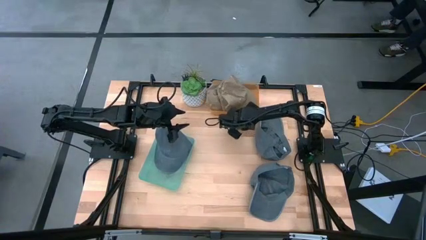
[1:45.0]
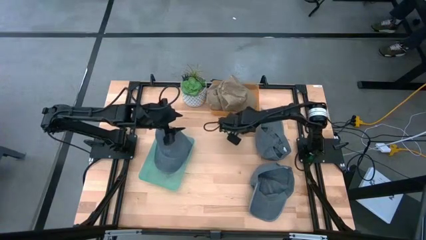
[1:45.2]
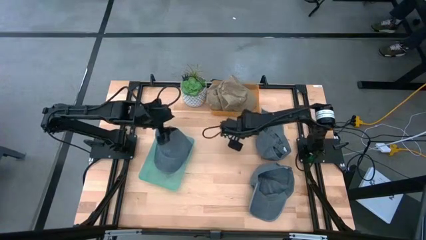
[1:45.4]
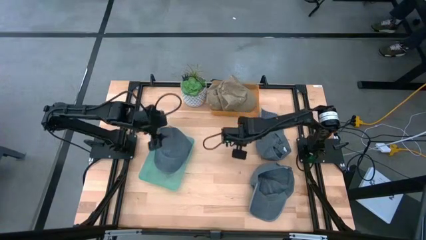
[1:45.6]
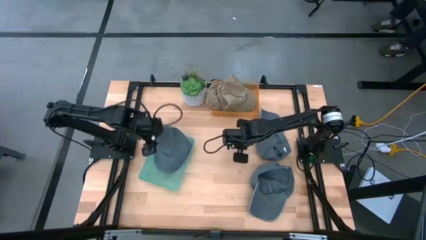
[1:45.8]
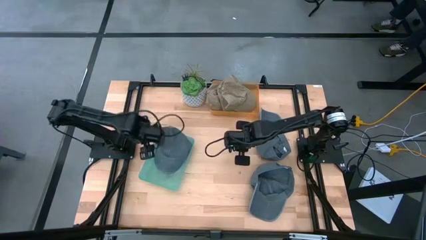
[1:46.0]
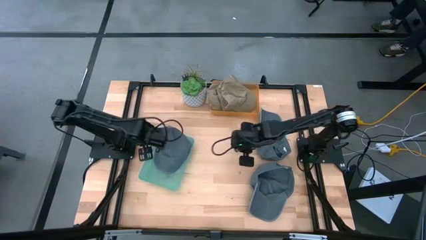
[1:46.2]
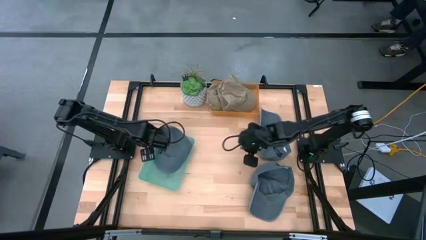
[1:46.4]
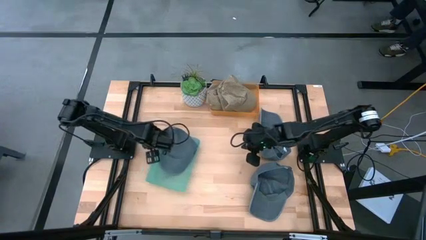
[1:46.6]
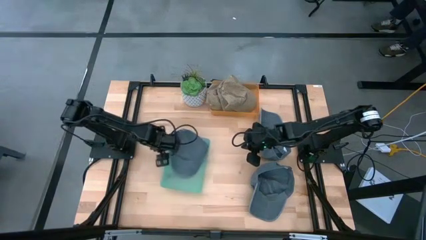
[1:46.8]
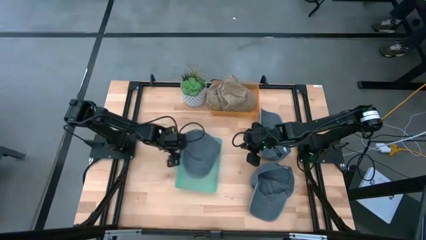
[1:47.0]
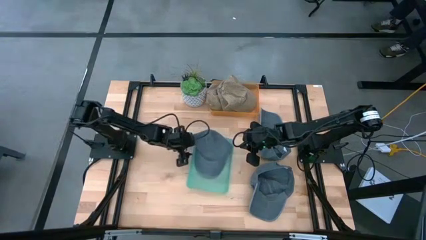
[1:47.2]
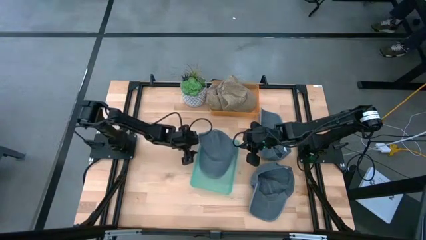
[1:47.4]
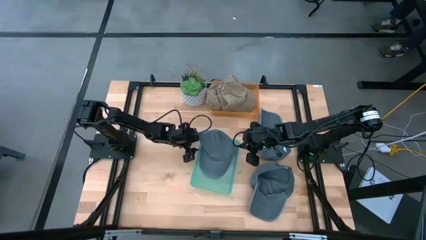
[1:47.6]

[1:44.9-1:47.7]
Task: Pick & Place hat
Adjust the green bin on the middle of the table

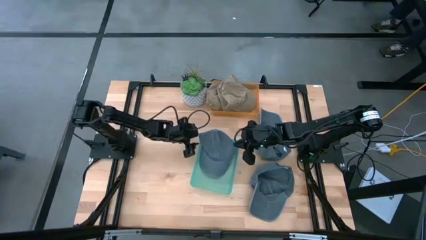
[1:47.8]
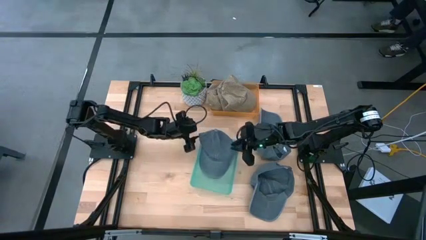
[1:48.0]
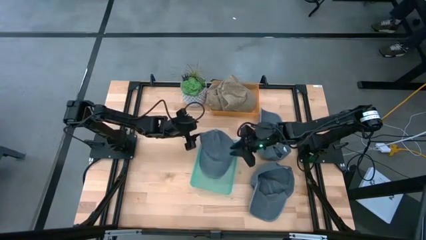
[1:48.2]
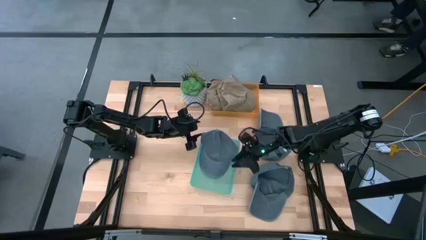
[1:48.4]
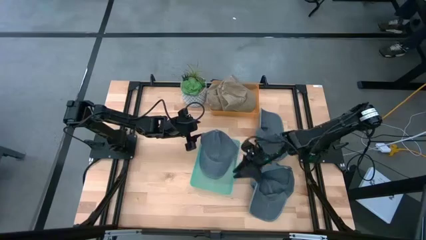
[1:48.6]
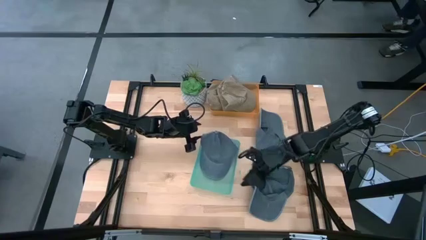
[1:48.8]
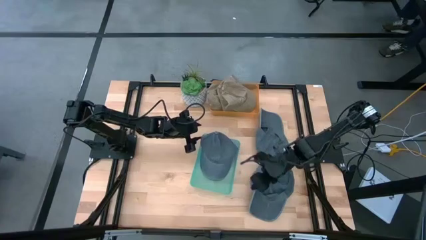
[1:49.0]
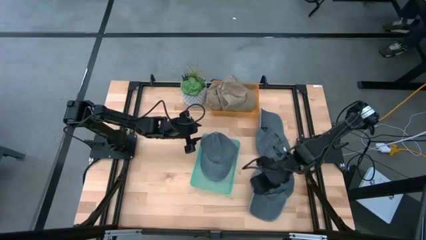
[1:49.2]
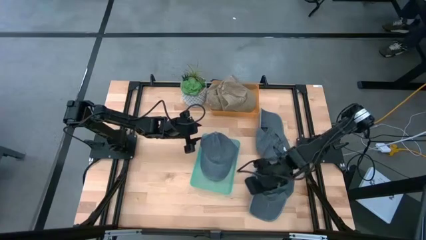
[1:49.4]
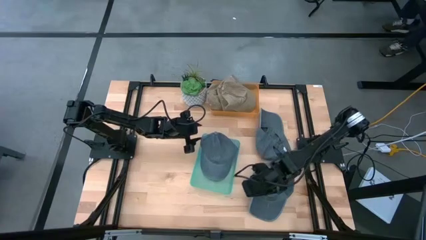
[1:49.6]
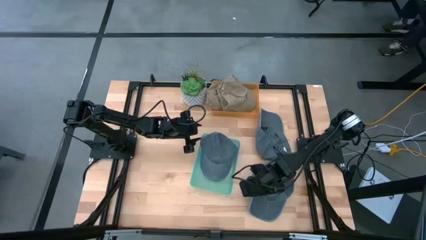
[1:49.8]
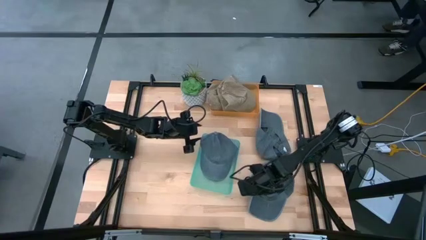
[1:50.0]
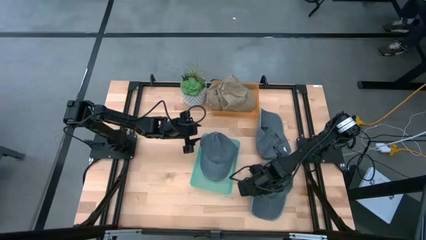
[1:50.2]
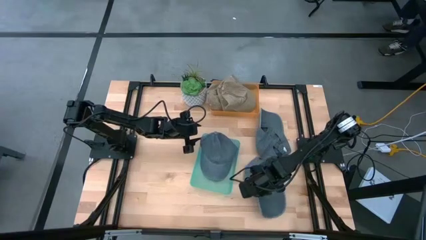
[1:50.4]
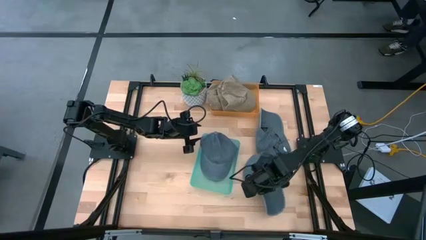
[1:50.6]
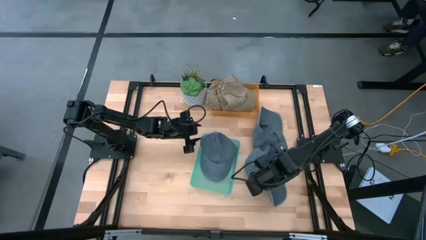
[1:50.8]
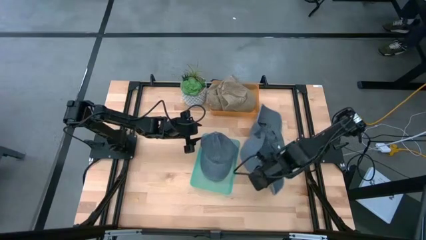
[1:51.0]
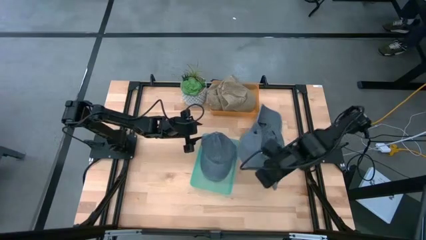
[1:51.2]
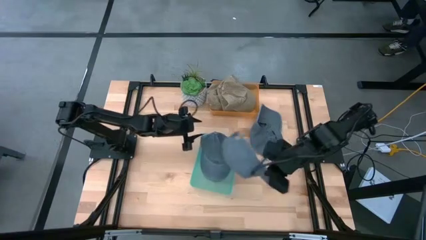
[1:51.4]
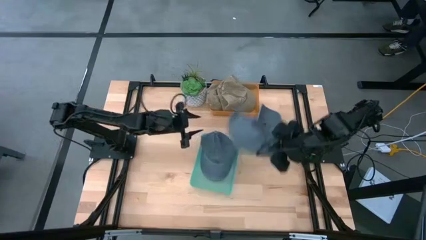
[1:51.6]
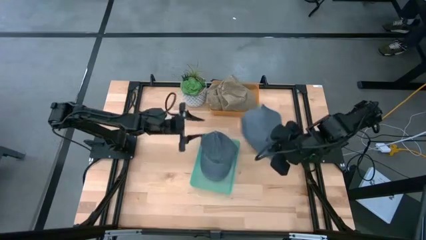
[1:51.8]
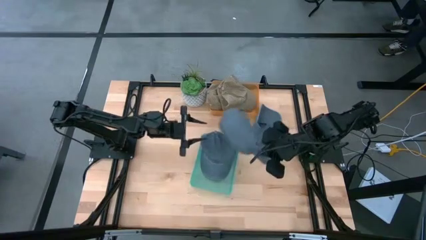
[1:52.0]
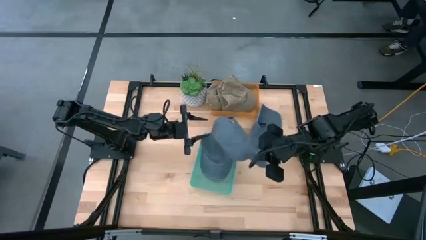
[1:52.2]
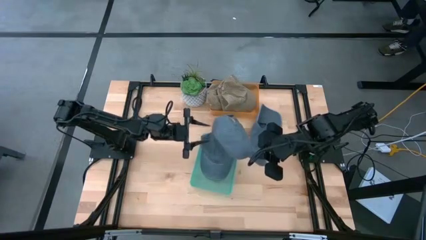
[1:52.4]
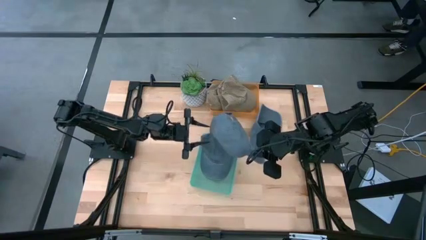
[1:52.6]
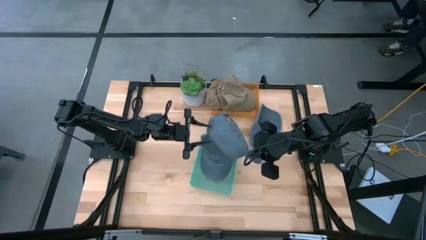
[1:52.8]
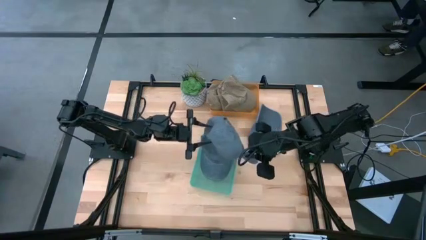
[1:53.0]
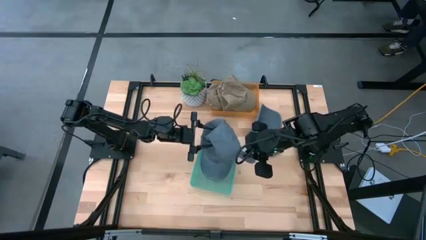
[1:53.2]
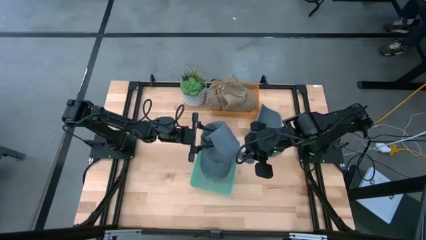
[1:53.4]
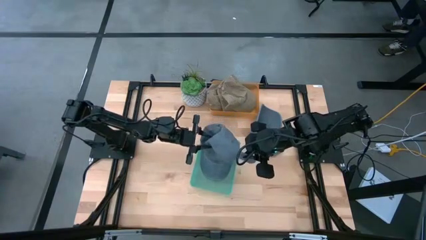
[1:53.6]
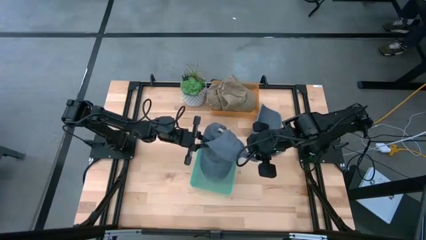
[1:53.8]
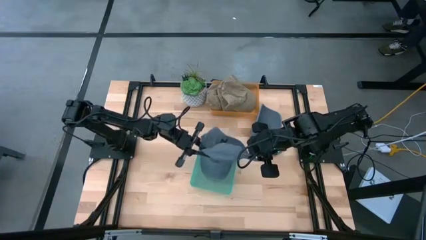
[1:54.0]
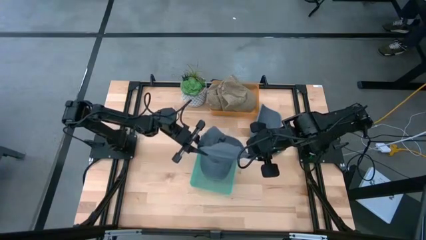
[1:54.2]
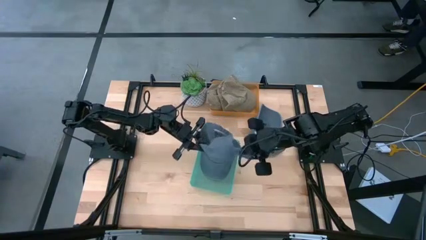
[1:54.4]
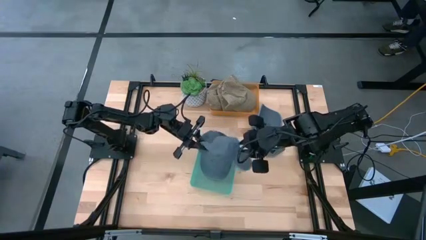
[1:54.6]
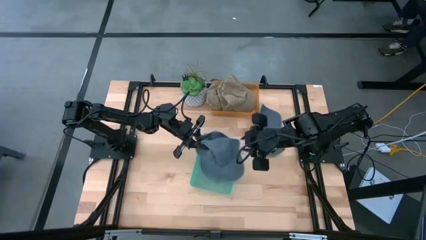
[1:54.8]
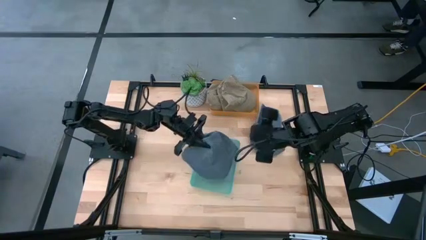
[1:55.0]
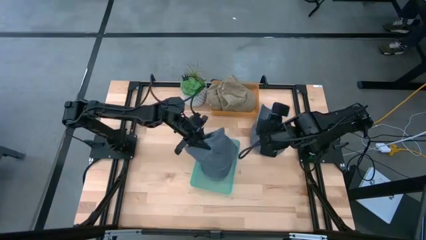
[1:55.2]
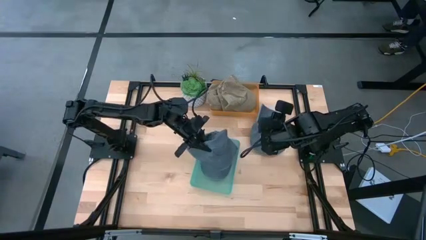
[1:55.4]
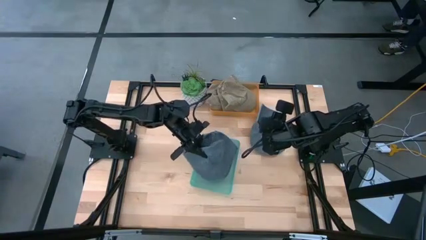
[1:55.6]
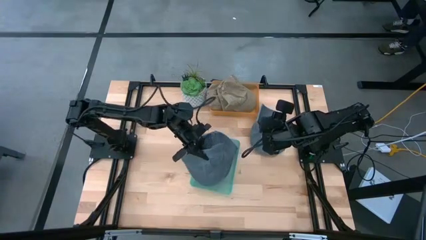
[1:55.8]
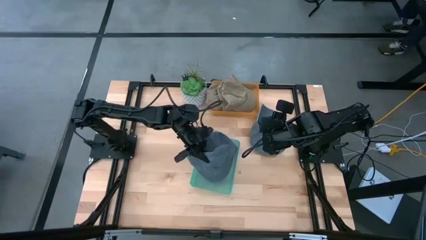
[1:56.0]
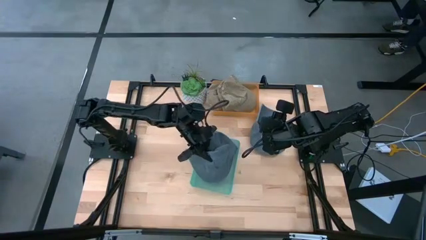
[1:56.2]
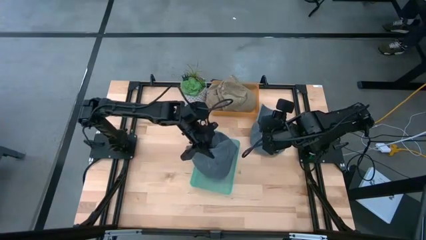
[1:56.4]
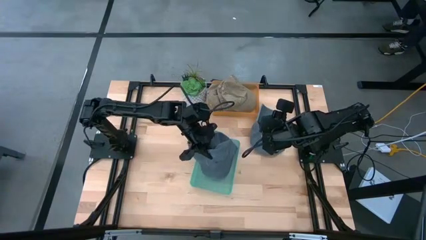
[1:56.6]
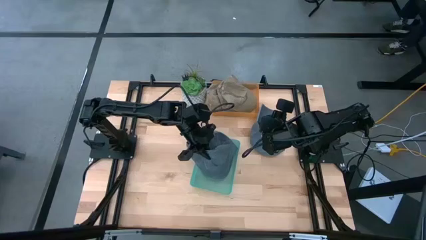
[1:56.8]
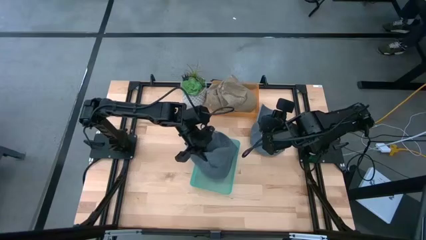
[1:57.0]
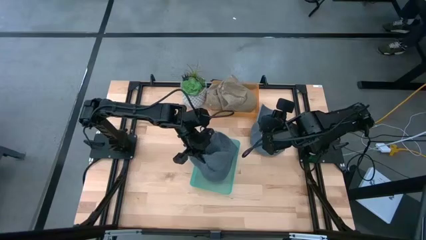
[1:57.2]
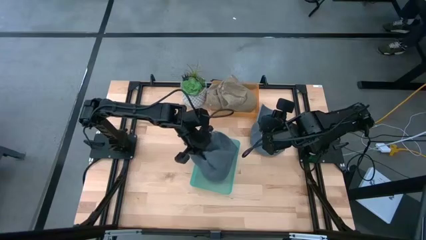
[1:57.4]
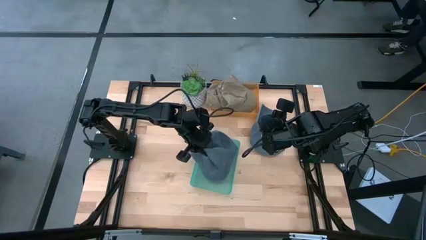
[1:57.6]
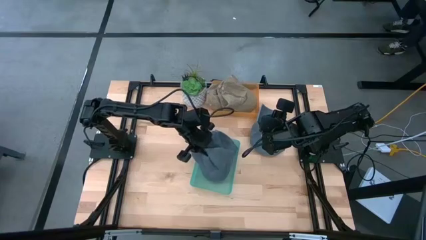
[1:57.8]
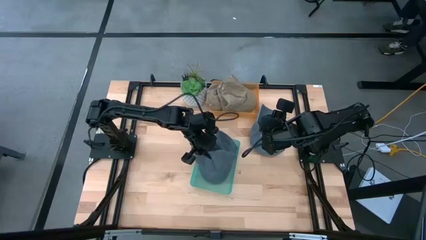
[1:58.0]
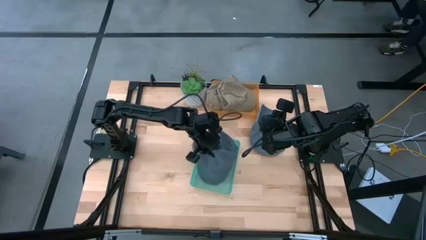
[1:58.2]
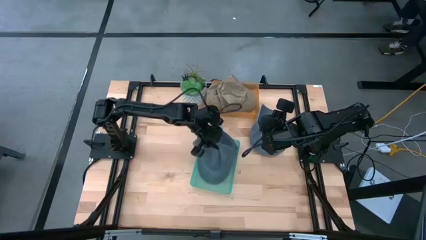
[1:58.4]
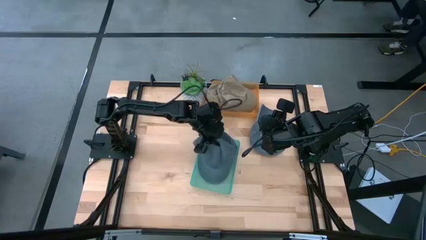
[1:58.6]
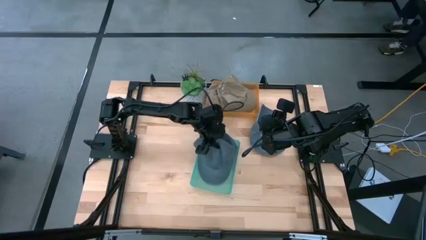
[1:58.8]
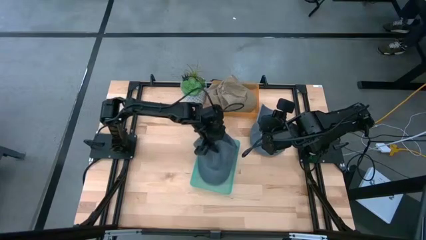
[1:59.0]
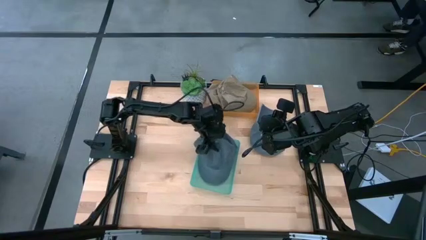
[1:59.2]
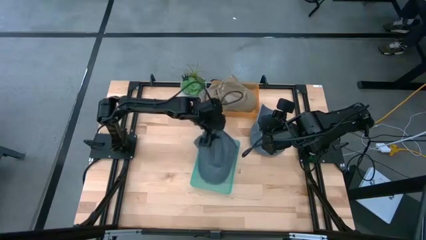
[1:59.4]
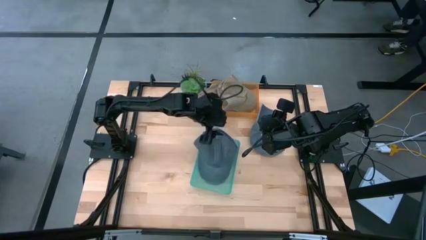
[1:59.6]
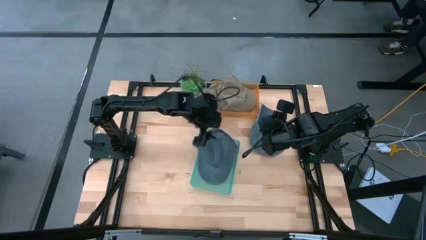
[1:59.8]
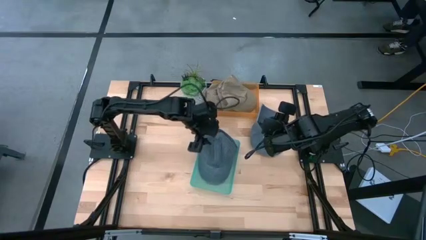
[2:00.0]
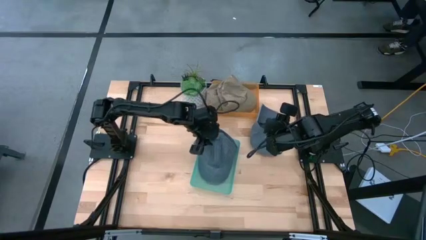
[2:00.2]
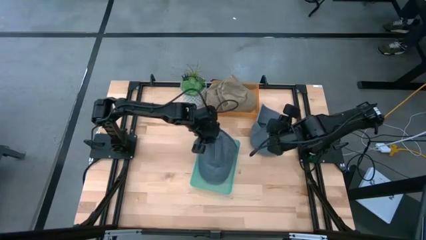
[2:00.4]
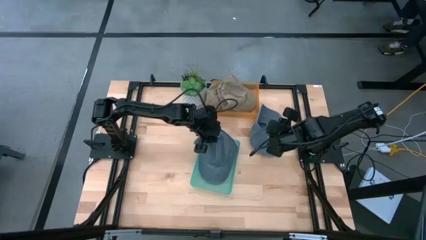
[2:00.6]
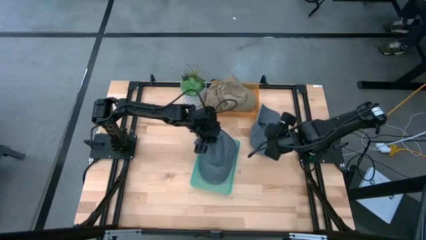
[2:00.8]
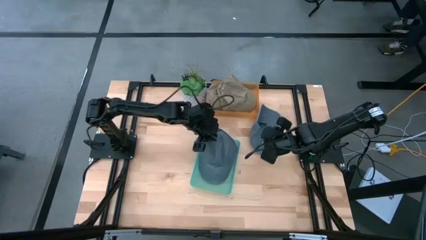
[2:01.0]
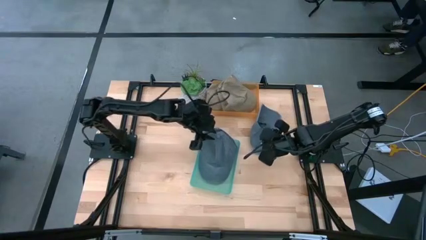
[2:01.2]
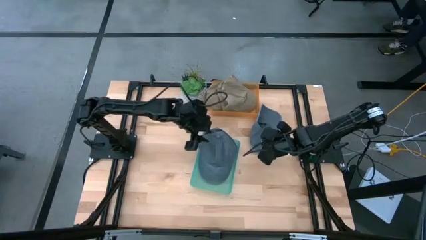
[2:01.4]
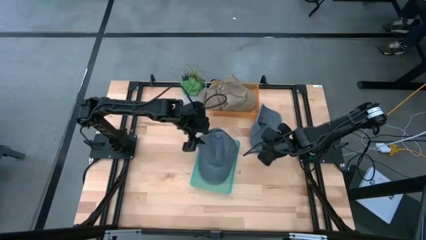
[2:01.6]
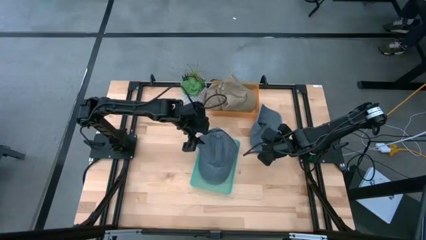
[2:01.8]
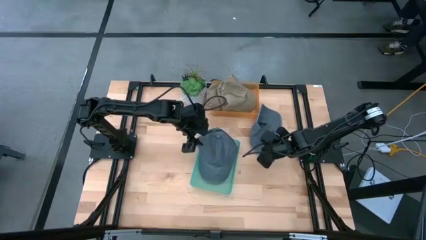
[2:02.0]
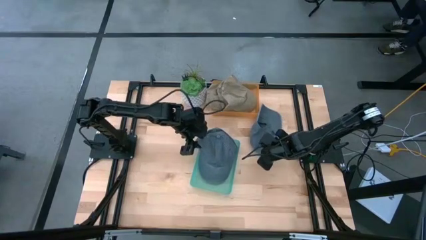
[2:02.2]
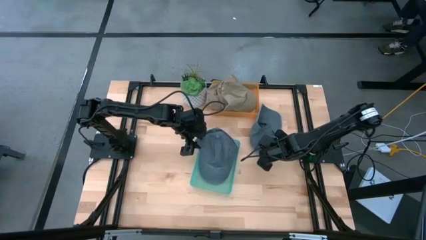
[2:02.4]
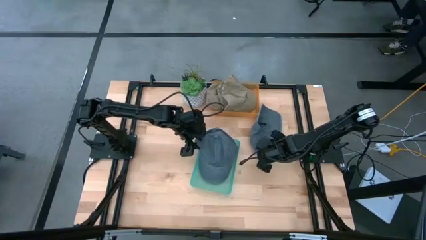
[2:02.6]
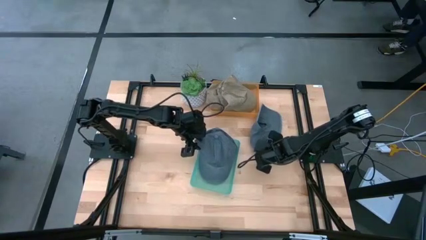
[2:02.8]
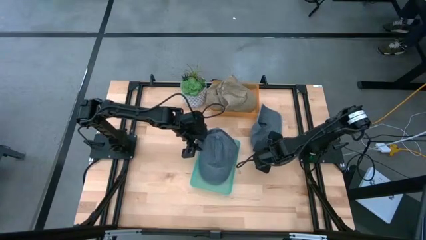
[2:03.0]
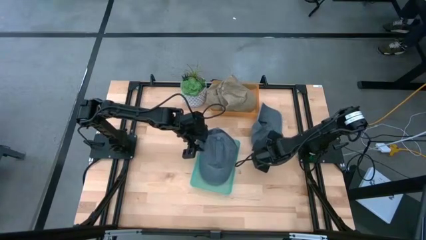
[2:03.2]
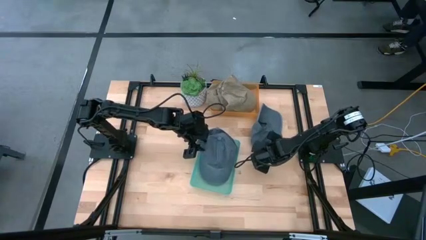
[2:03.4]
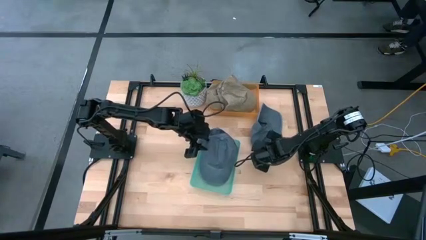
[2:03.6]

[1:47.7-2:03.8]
Put the bottom blue cap into the green bin
